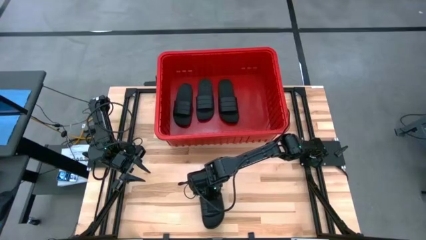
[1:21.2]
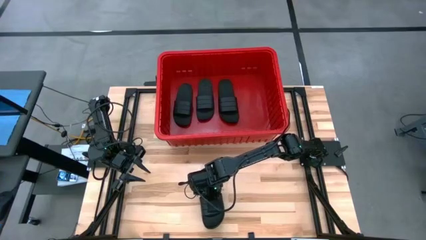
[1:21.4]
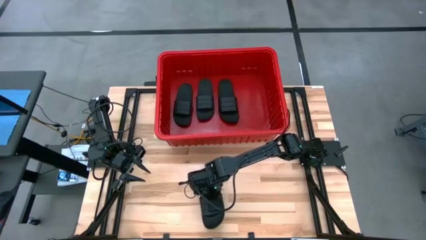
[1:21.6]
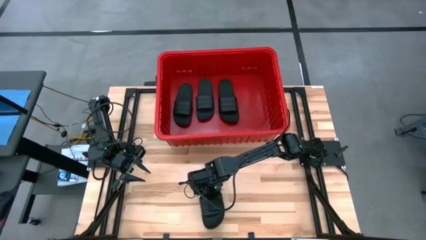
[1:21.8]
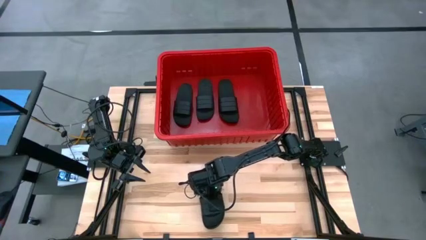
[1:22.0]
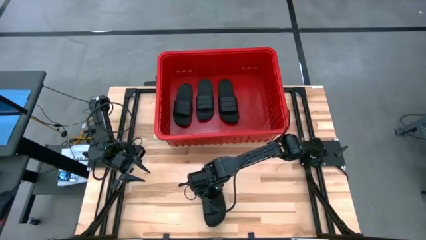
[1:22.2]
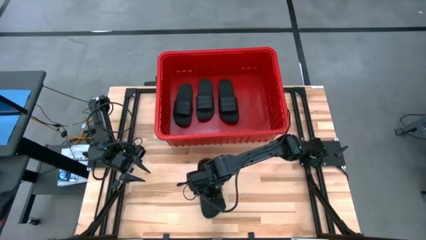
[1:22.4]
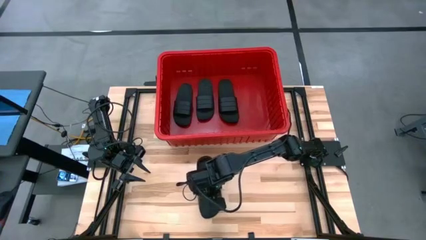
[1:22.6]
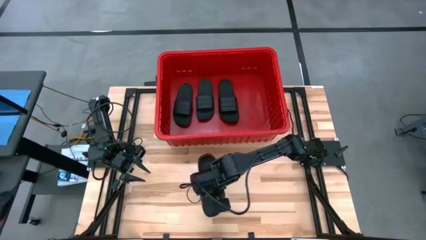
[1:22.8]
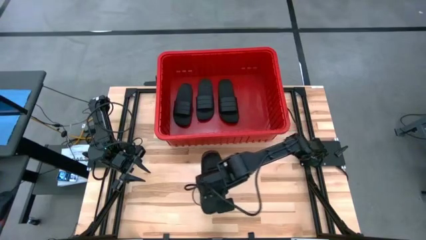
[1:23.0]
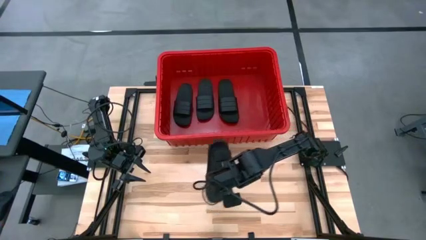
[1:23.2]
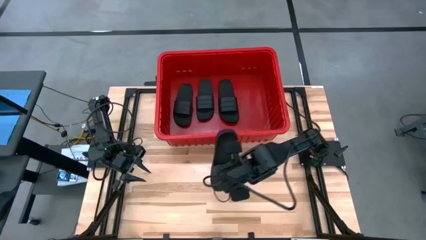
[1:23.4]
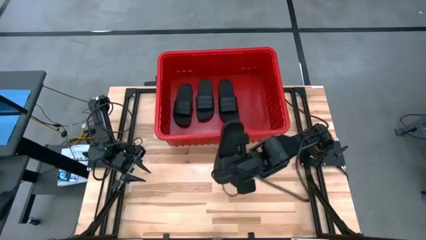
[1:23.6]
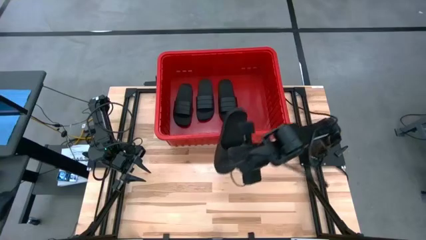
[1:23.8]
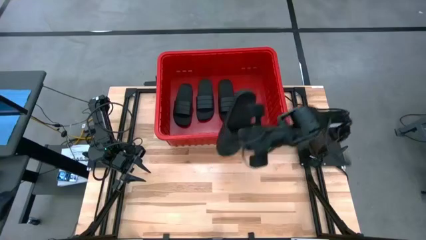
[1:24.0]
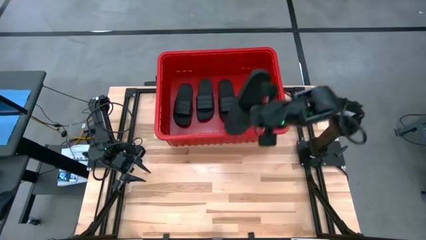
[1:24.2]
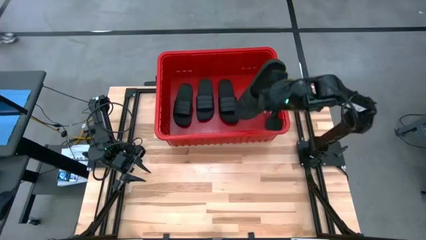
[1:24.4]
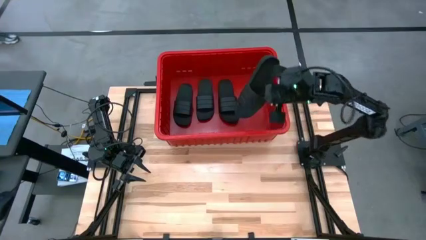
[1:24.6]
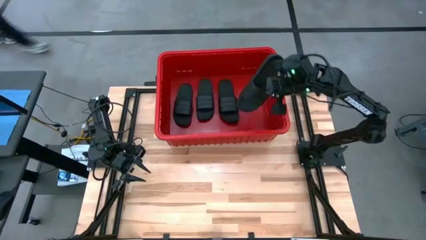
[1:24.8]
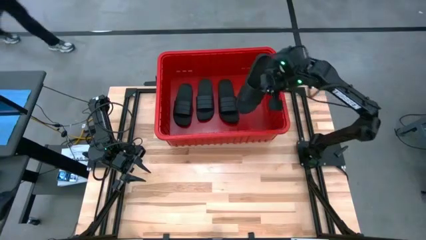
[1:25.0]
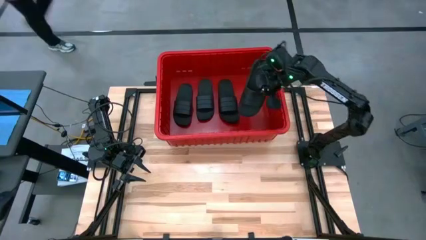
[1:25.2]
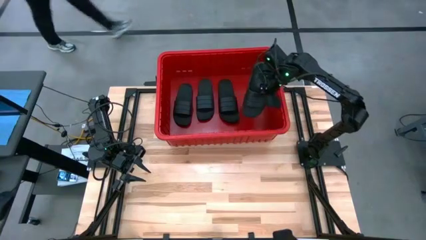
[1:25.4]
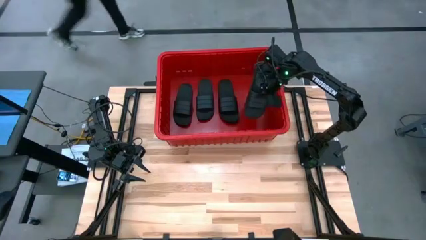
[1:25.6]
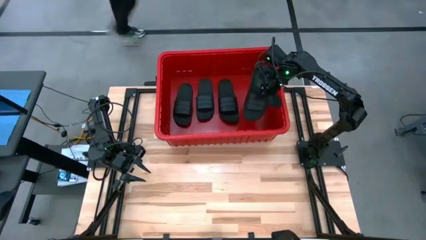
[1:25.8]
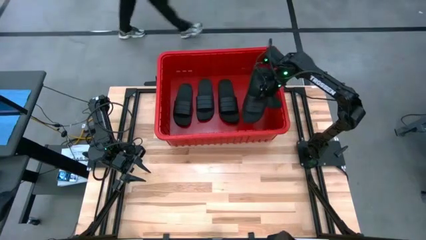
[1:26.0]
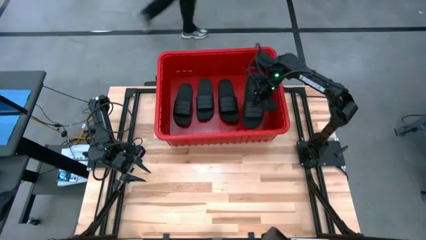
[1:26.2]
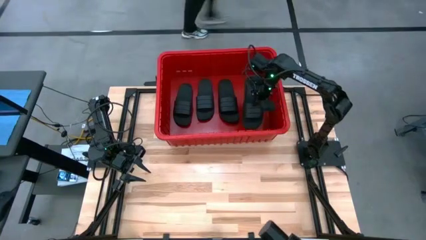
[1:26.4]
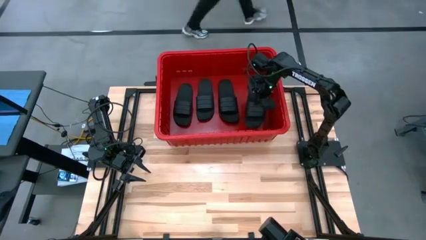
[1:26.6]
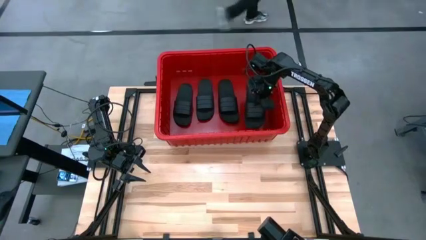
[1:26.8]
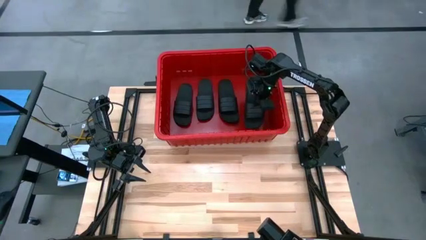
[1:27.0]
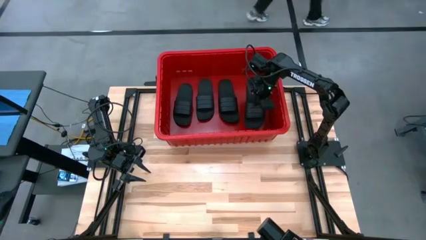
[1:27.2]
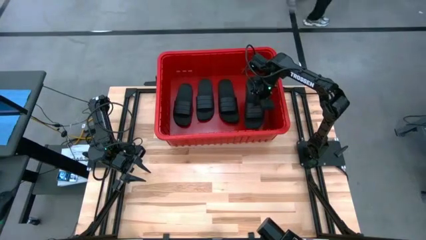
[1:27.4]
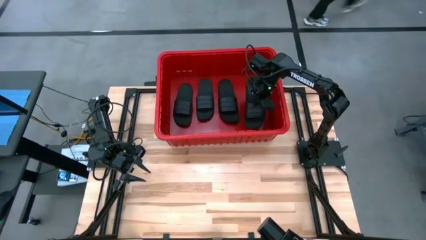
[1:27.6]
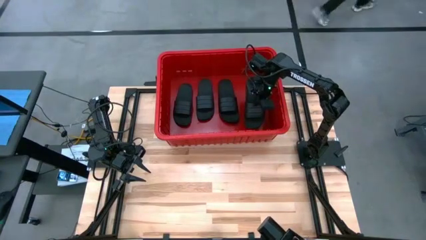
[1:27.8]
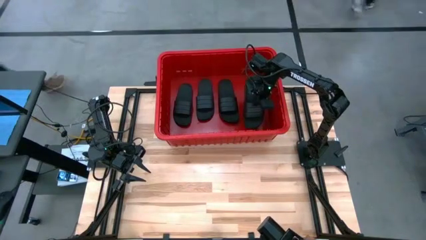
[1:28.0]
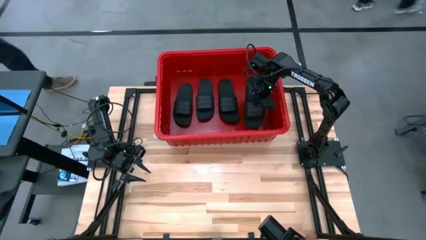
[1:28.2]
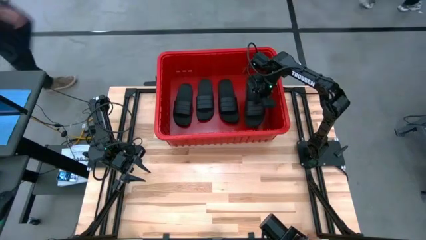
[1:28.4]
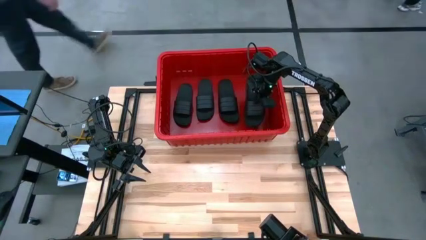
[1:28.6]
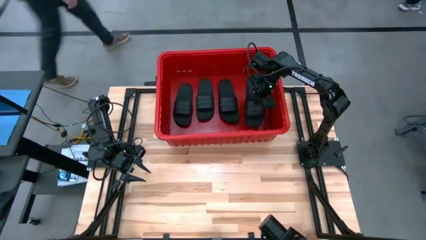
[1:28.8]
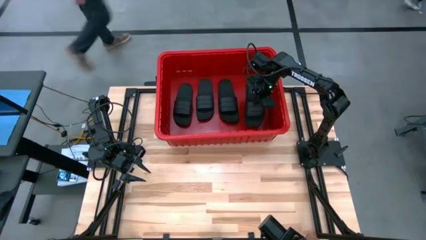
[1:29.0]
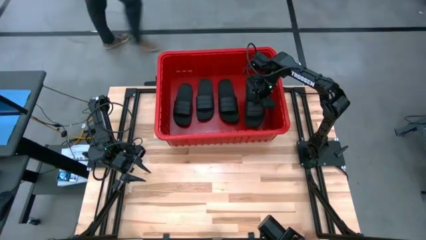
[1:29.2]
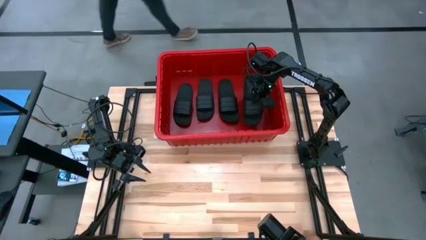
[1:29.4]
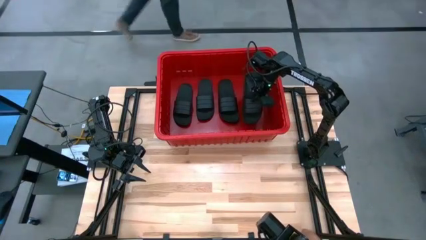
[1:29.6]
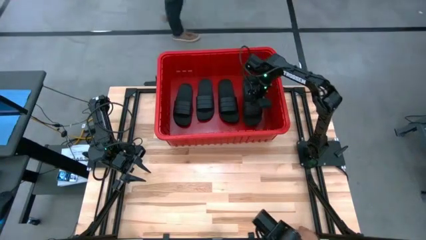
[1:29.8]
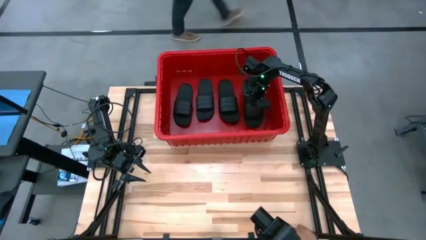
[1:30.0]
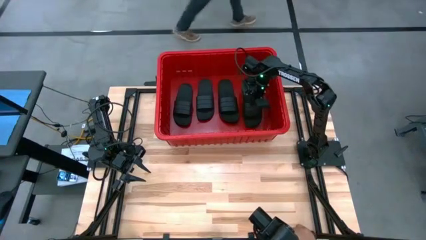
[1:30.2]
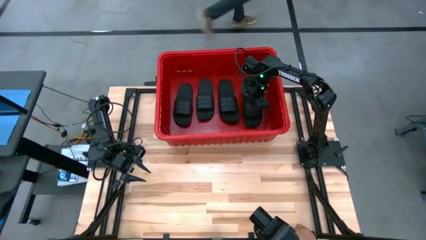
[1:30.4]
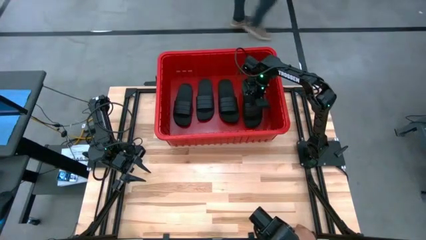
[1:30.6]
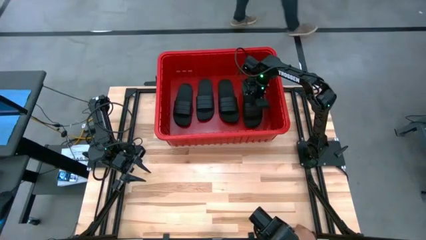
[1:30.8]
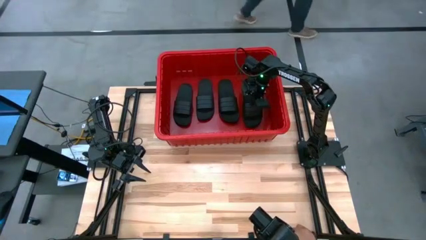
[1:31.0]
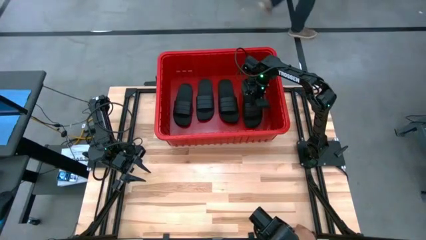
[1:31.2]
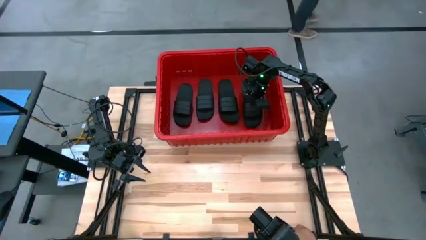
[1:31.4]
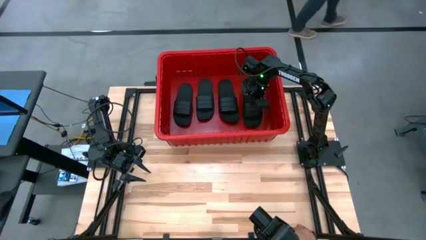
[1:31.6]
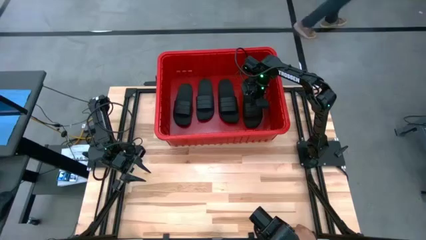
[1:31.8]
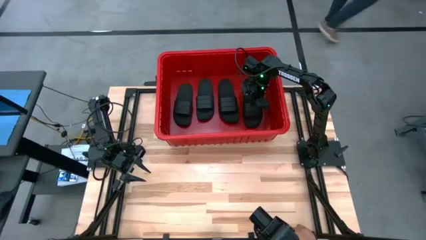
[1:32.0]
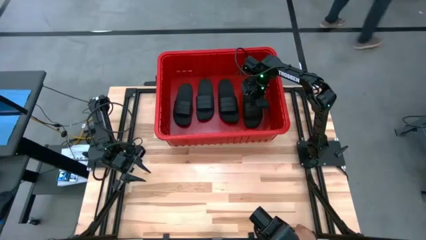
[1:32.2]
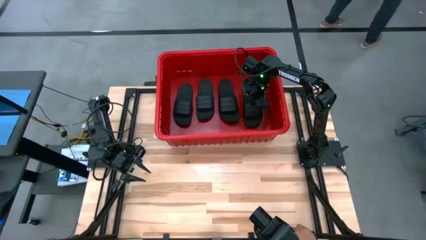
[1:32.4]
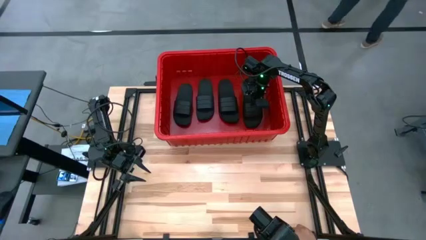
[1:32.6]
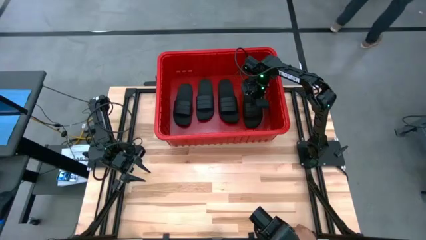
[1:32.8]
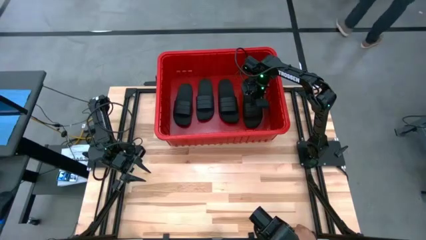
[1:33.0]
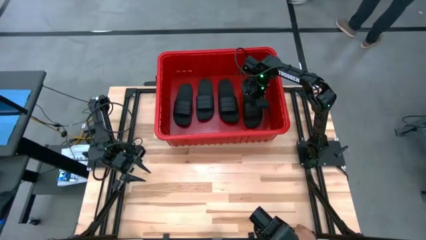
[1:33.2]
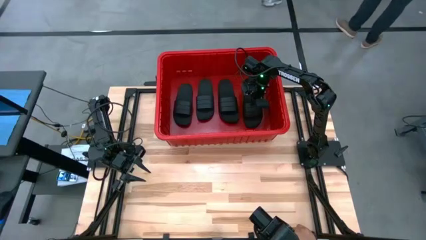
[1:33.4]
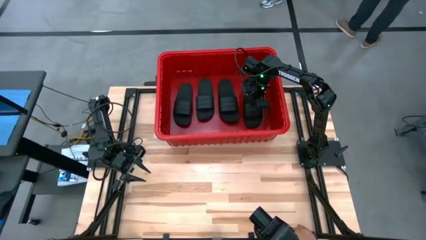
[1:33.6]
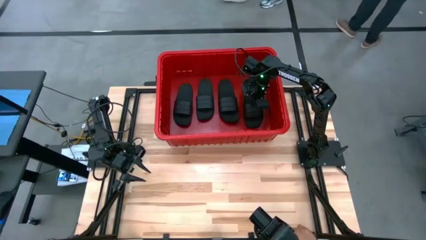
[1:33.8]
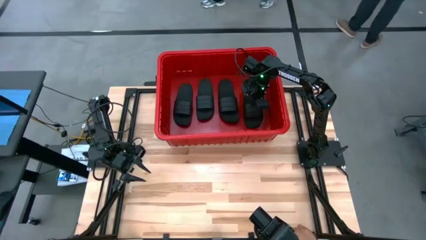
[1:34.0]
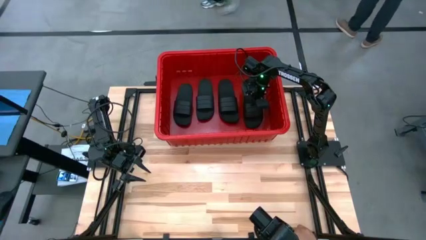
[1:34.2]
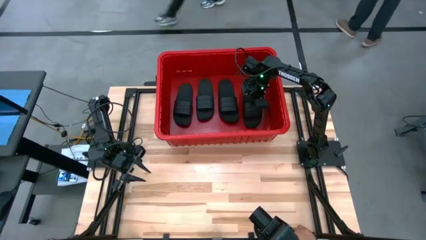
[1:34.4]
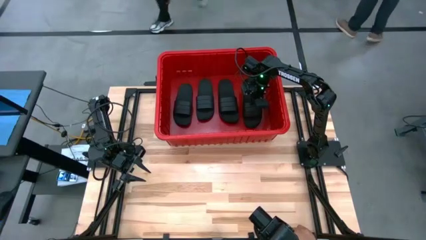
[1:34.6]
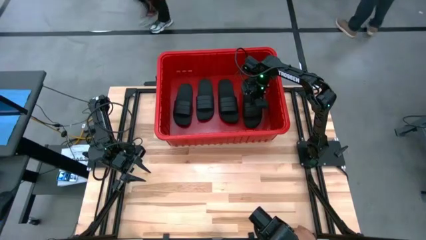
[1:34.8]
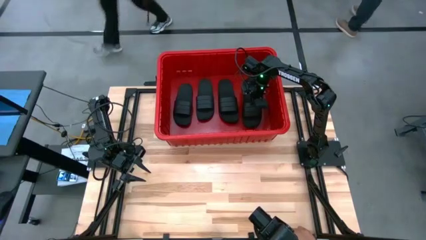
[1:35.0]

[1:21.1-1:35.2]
Task: Pick and place slides into bin
Put the slide into the bin

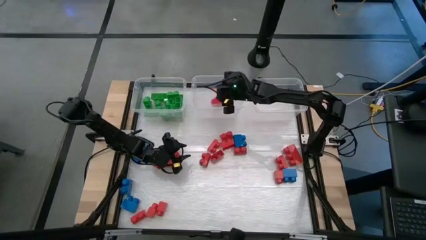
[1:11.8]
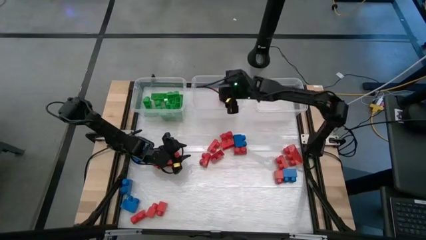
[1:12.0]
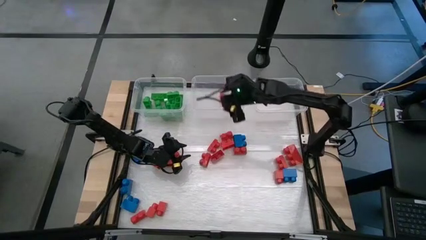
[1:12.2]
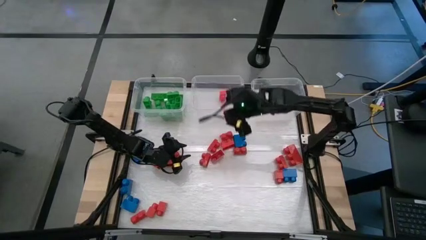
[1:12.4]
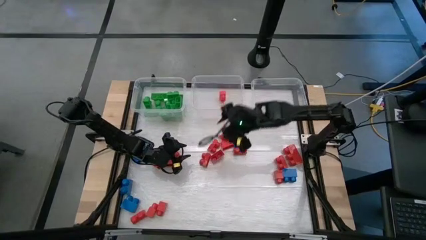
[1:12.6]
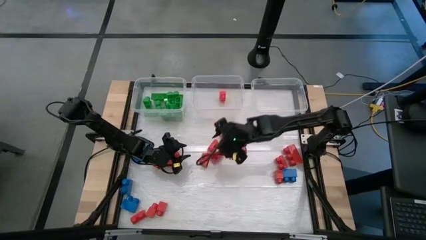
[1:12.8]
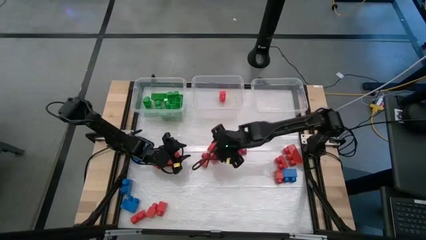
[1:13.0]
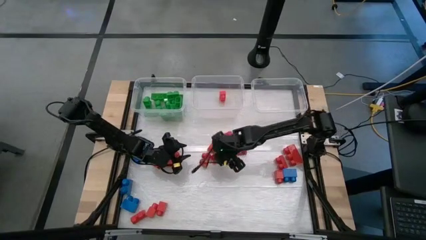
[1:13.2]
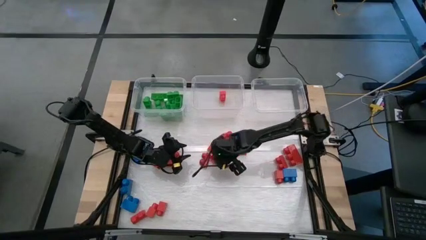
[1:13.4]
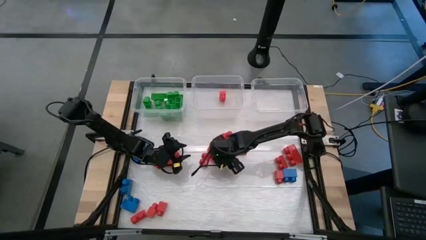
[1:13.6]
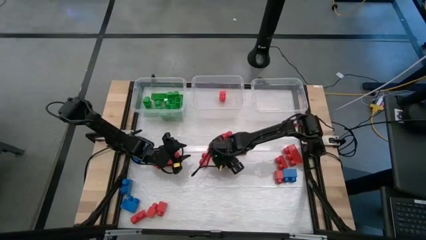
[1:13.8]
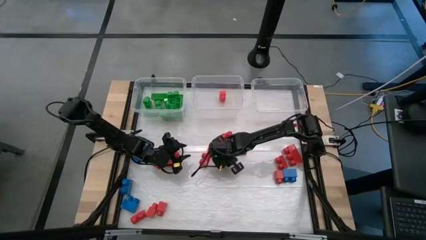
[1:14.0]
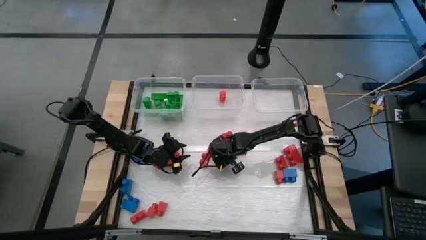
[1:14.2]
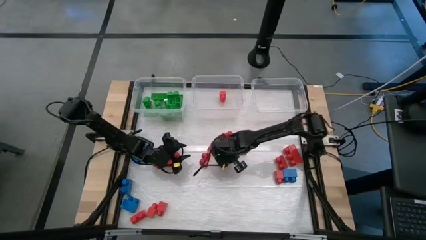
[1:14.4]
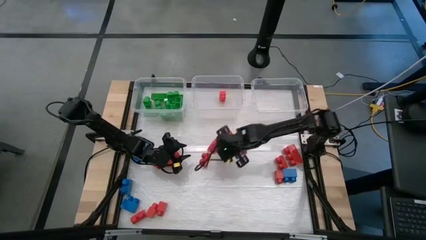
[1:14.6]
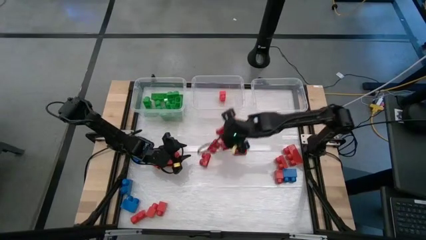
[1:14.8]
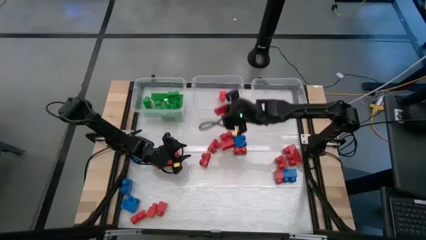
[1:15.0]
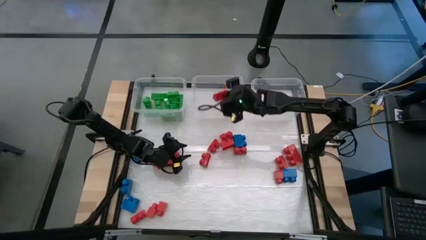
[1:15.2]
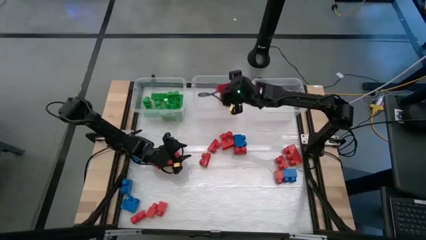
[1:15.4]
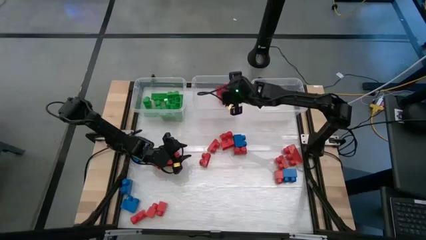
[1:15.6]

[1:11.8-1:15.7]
Task: Sort blocks
Put the red game piece into the middle transparent bin
